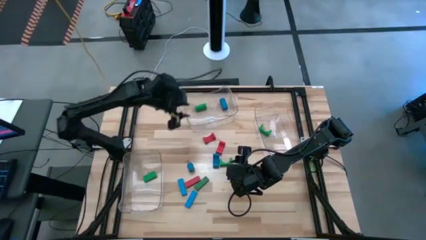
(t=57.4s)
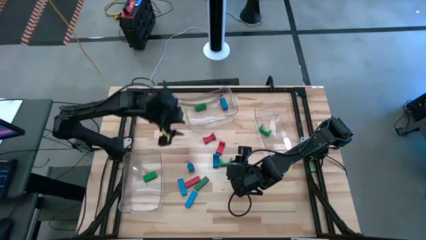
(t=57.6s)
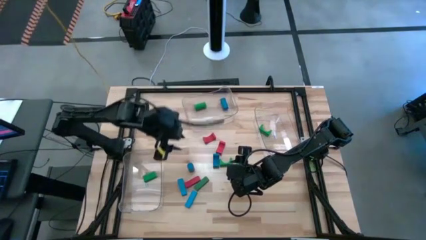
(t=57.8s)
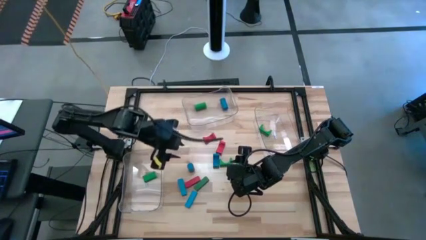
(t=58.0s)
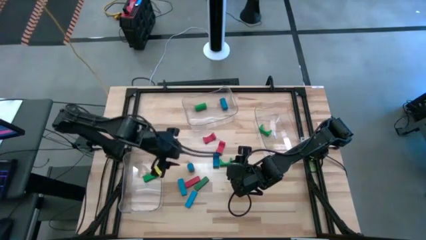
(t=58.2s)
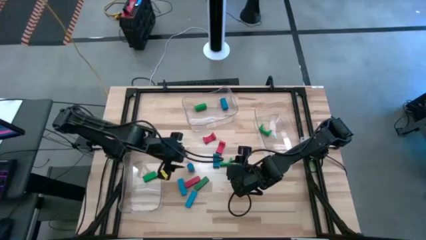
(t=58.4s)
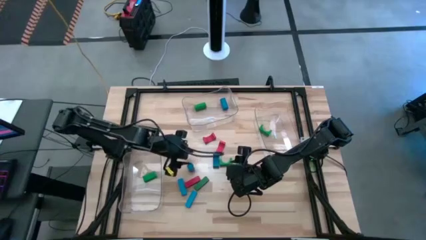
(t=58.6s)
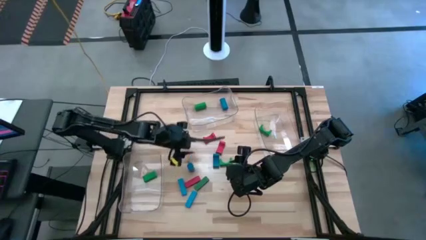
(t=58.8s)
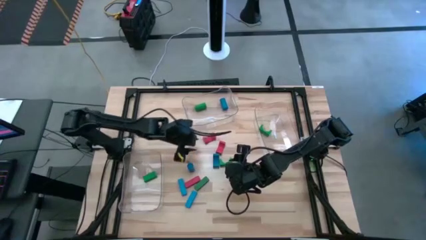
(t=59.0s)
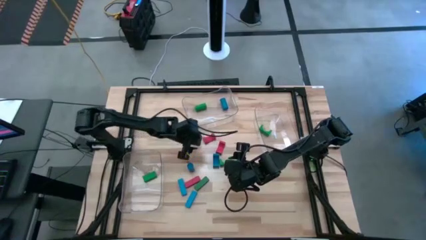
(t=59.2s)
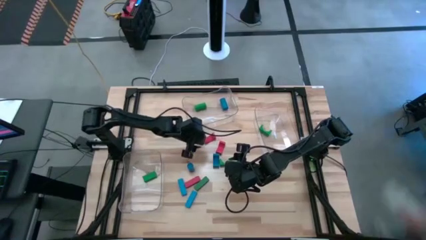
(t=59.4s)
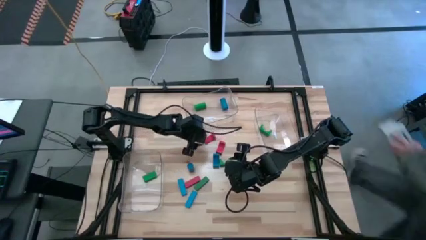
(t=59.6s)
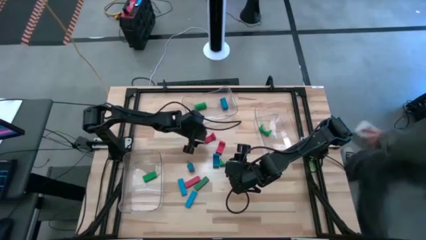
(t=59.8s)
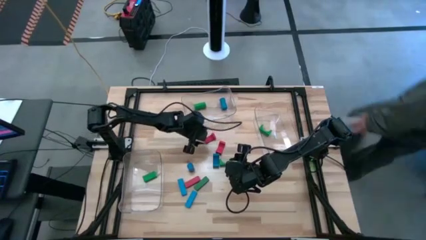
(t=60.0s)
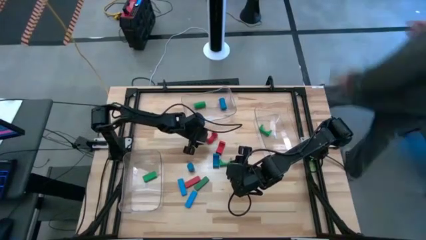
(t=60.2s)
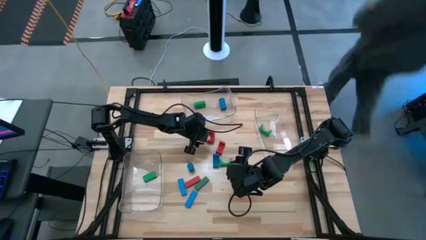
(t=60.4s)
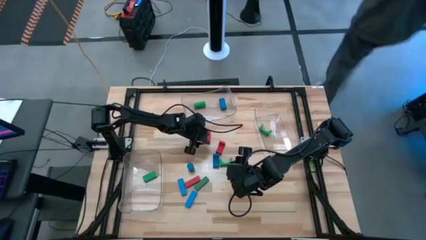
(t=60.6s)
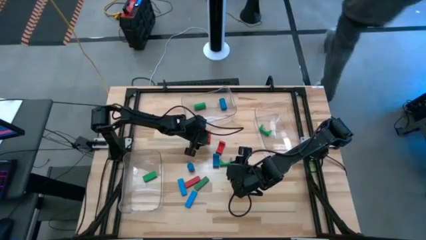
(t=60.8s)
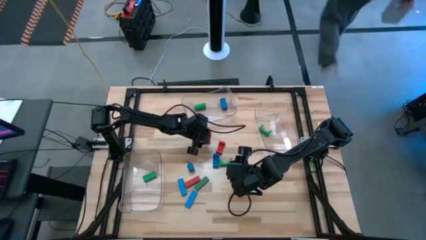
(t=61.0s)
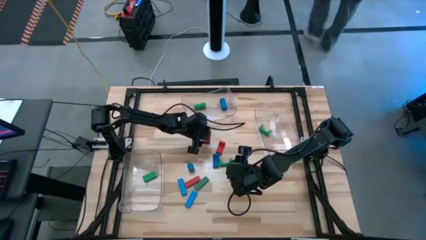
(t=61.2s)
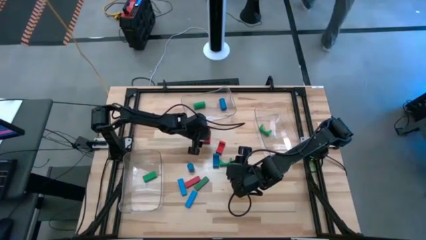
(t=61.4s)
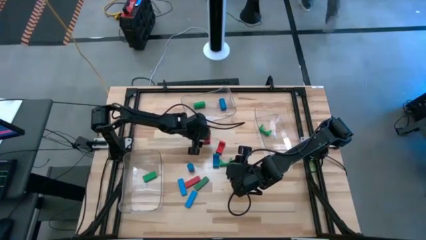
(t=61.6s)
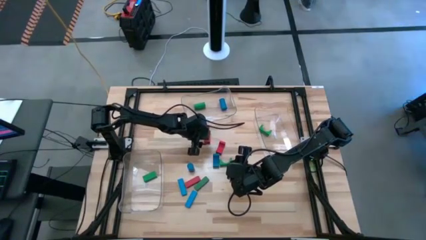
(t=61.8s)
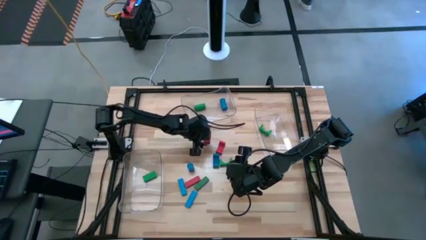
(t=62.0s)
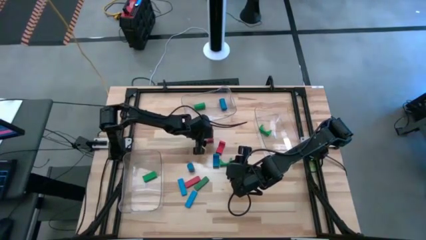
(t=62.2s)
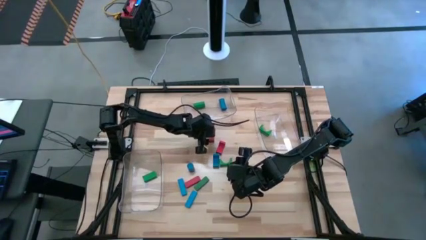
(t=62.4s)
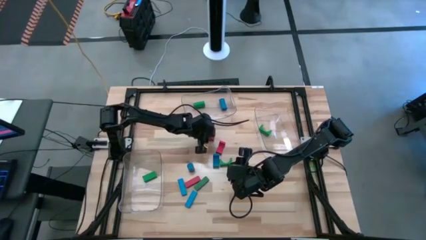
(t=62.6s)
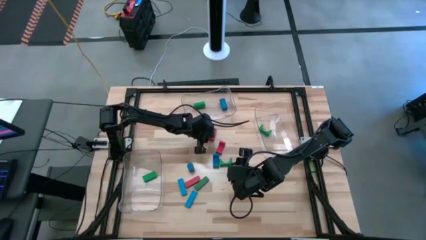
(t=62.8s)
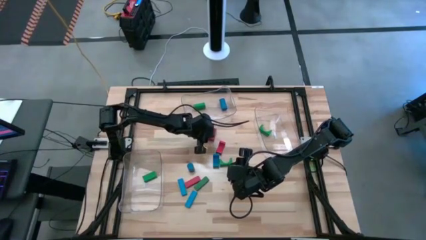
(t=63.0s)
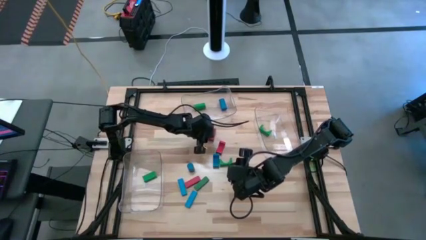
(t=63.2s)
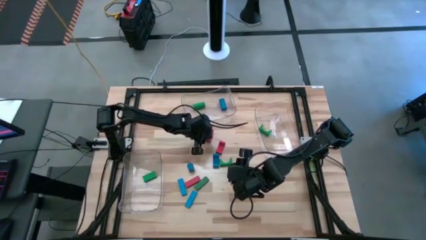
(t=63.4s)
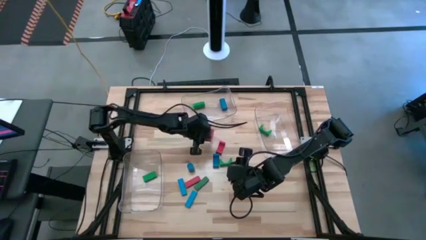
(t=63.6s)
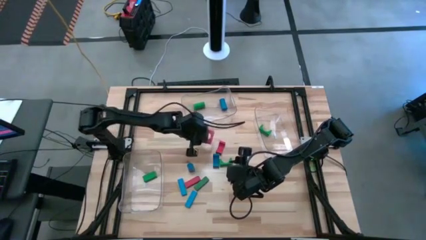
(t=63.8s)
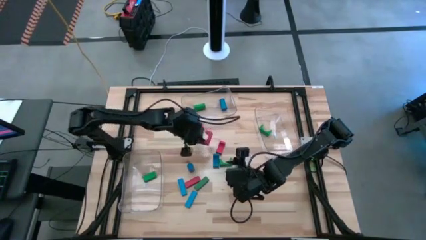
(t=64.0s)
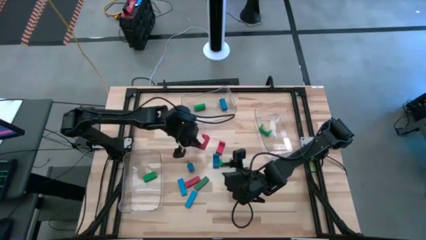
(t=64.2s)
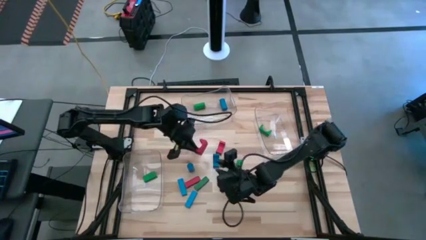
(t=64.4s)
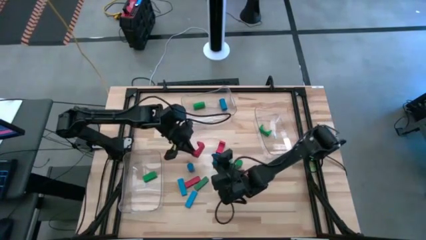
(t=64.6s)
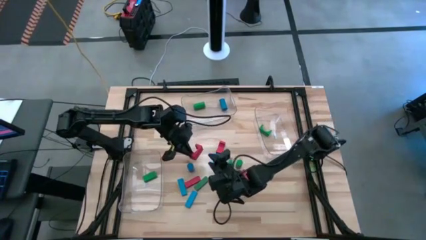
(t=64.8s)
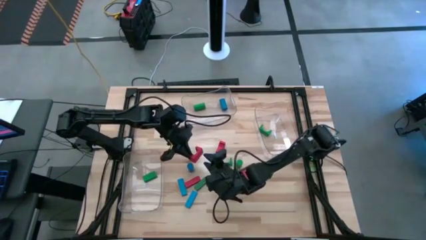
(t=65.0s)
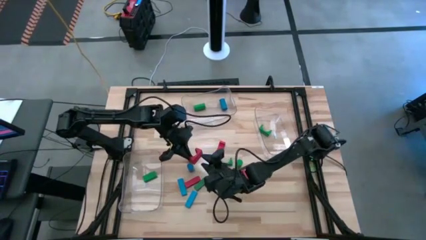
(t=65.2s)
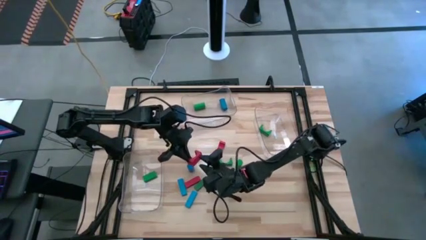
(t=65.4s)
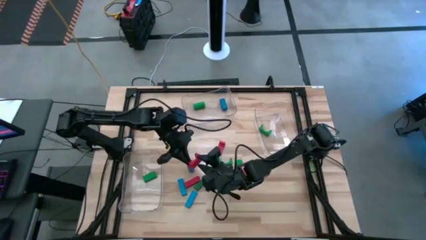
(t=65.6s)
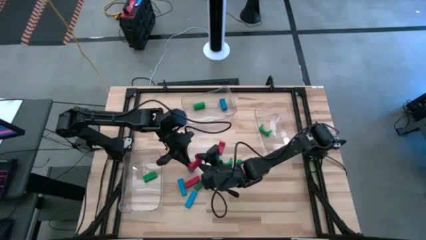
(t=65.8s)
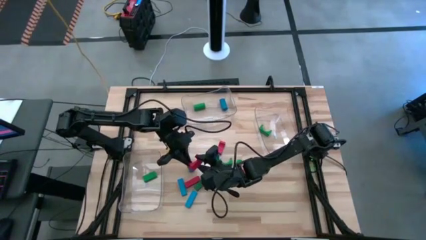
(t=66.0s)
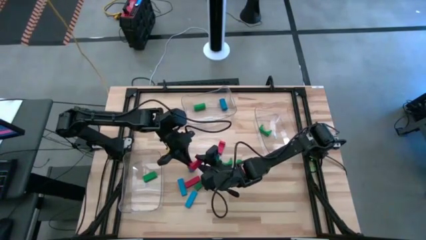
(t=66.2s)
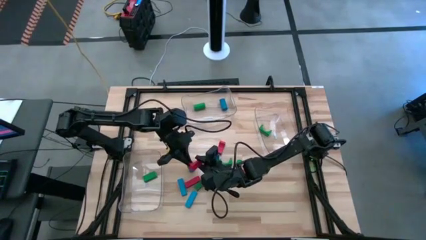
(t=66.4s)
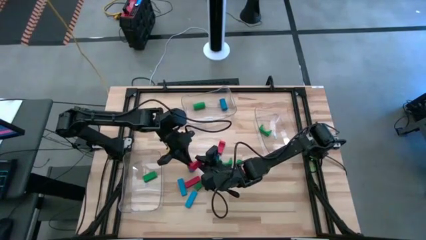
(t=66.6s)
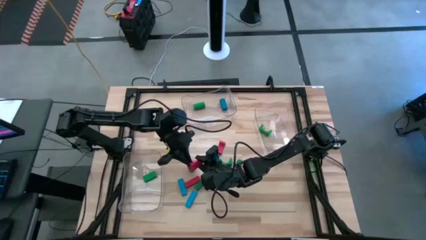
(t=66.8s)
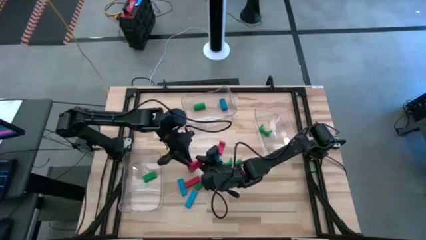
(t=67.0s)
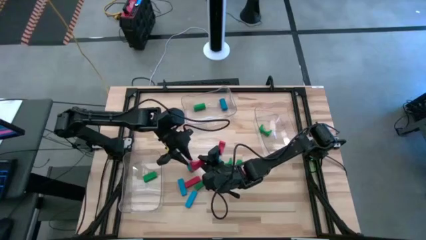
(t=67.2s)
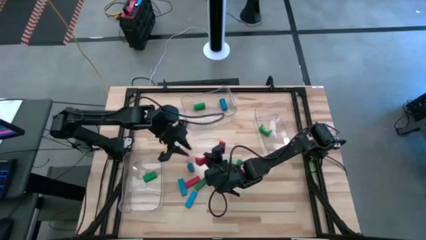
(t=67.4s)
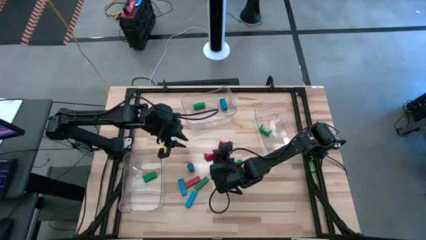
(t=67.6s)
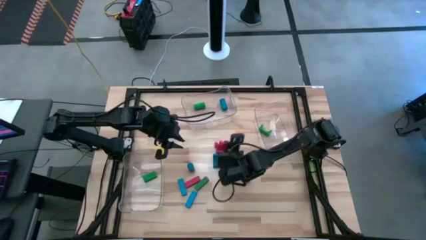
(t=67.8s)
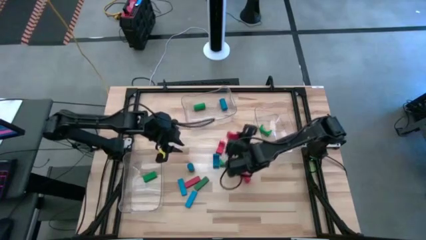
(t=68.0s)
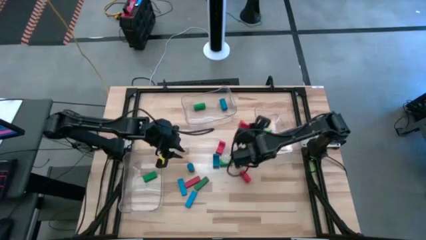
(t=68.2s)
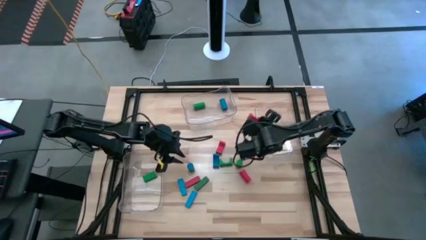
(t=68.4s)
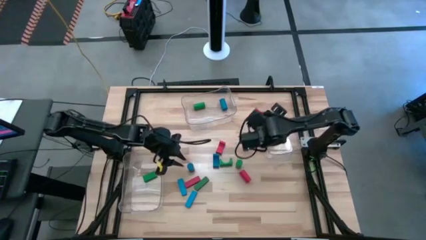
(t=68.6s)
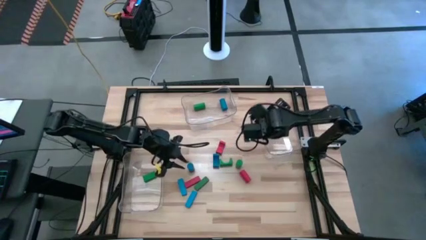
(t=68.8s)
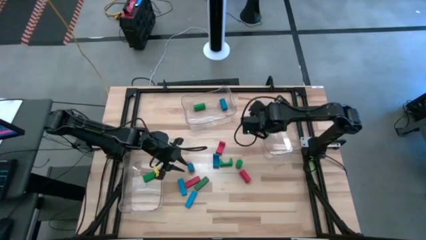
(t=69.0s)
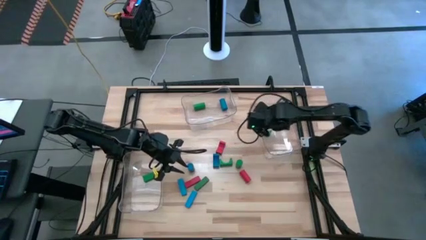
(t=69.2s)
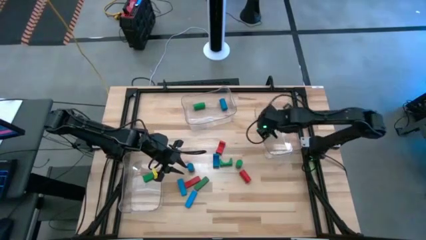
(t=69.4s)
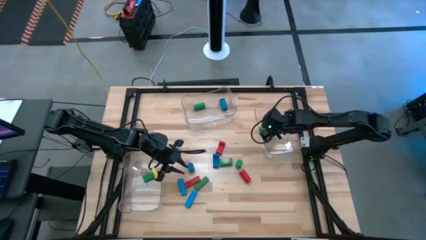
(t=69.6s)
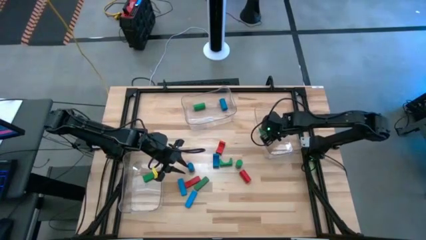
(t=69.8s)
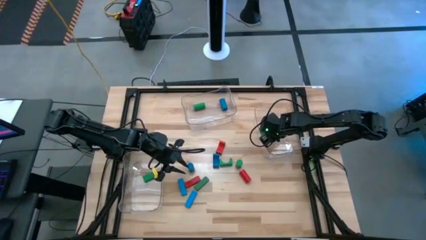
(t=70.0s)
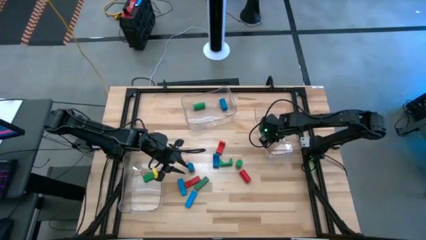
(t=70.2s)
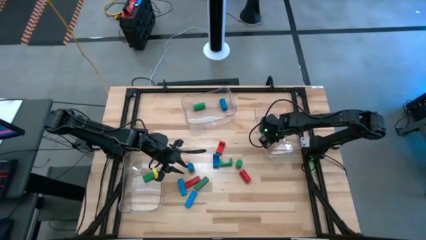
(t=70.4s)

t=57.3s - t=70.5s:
Task: Sort blocks by size
Put the left red arch block into the right transparent bin
